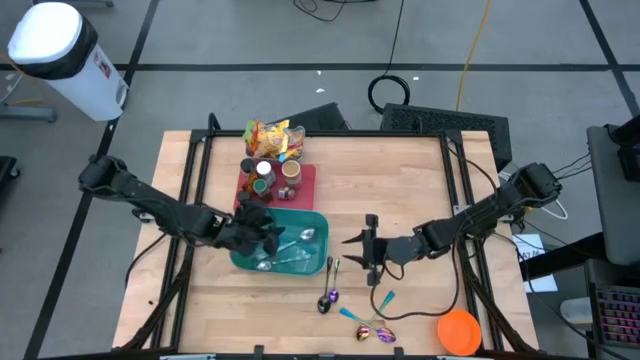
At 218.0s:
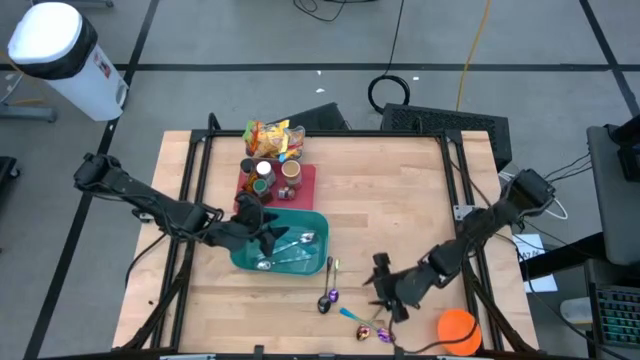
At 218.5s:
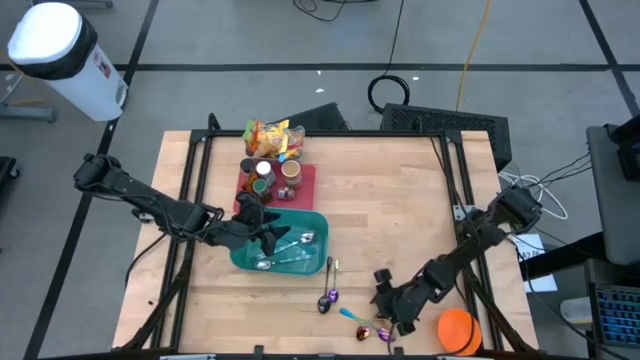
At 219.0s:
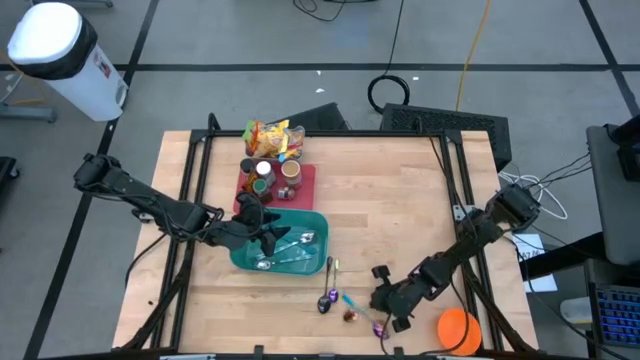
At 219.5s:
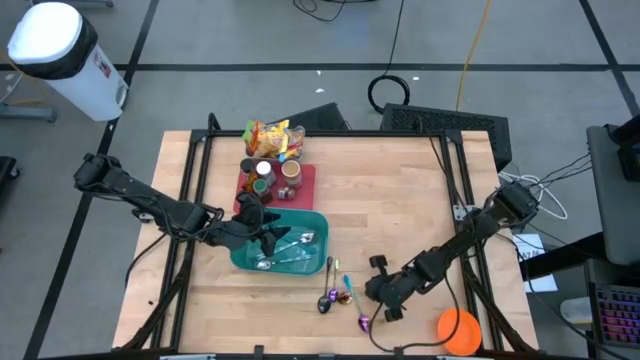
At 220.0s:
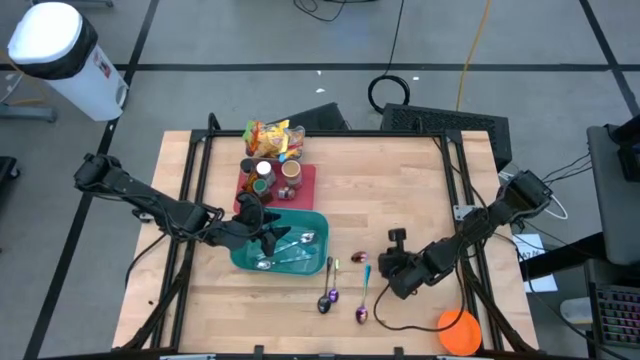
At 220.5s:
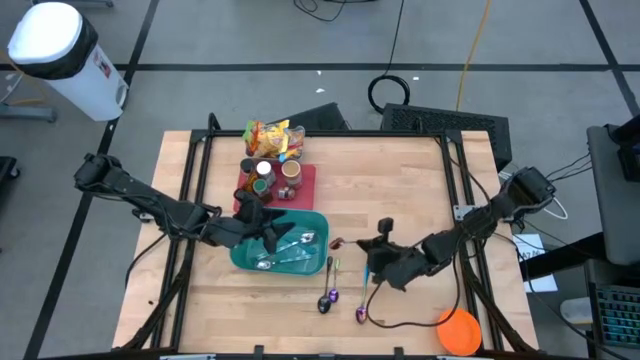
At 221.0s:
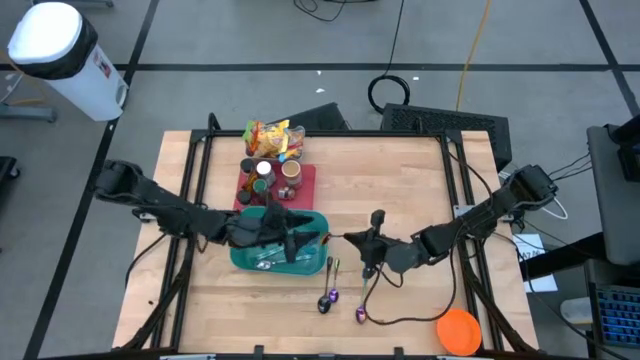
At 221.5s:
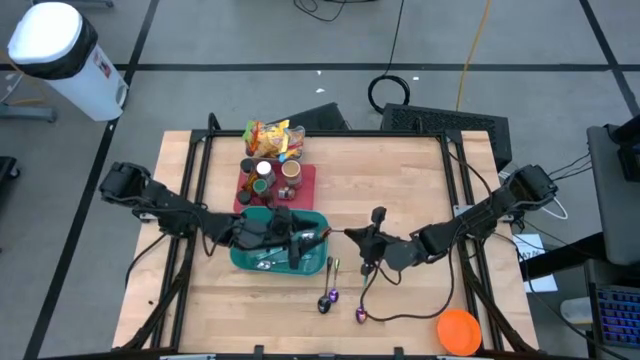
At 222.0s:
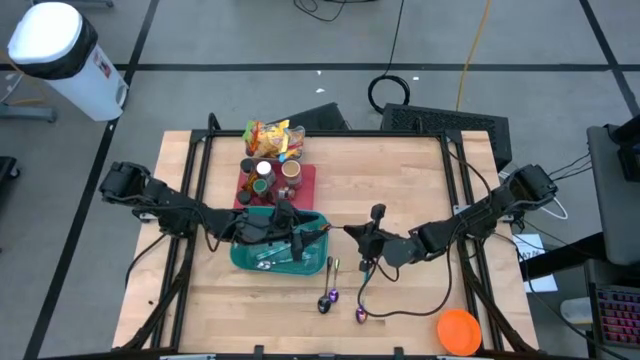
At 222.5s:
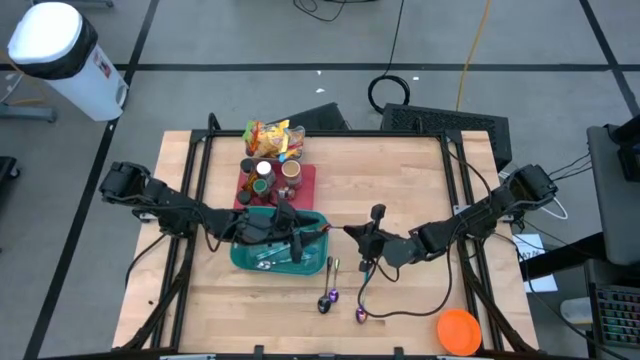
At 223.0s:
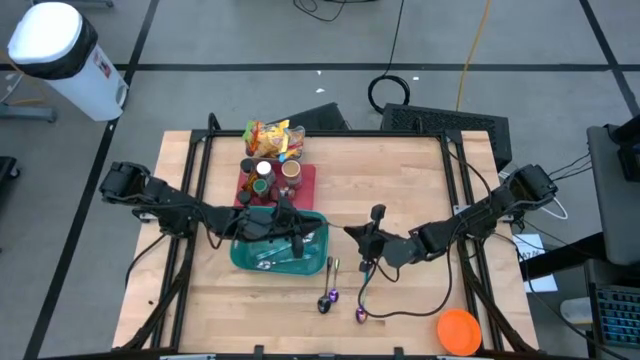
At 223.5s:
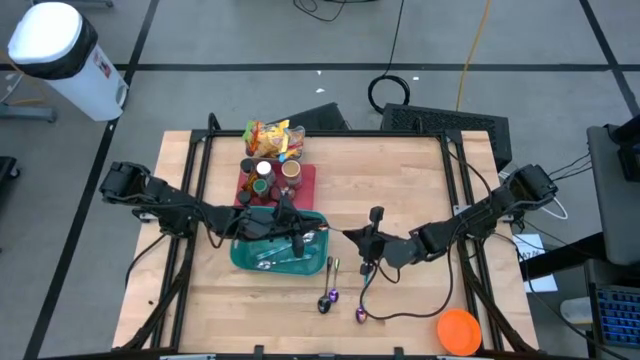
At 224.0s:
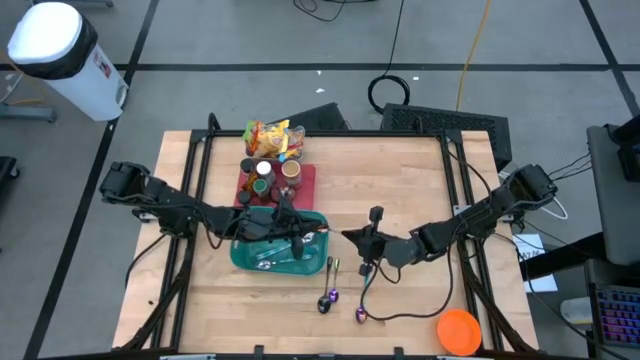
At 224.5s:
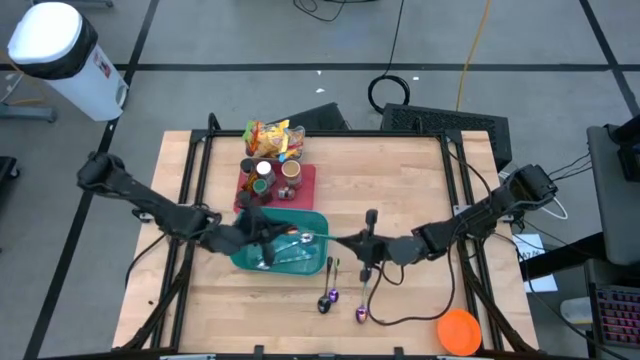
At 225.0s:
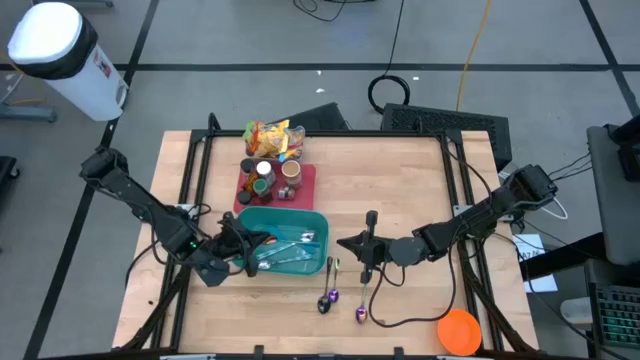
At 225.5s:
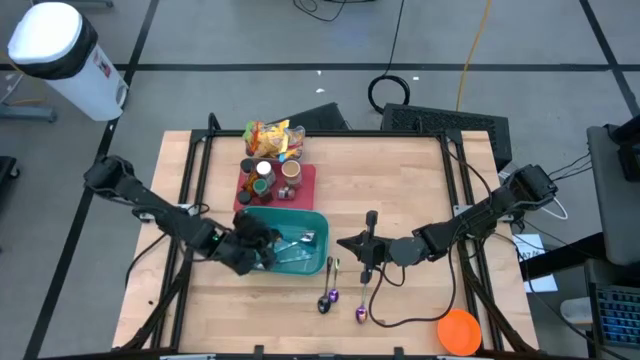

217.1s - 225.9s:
Task: Pick & Place Food Item
Put the right violet spoon into the blue bin

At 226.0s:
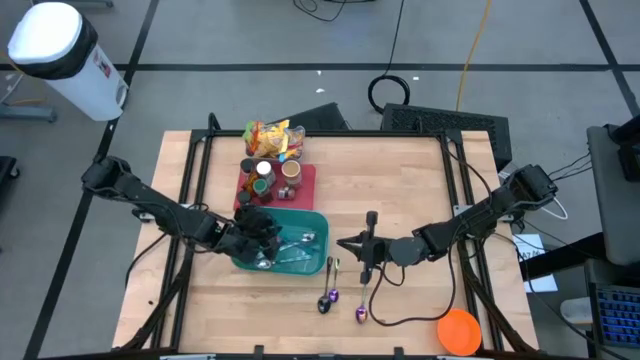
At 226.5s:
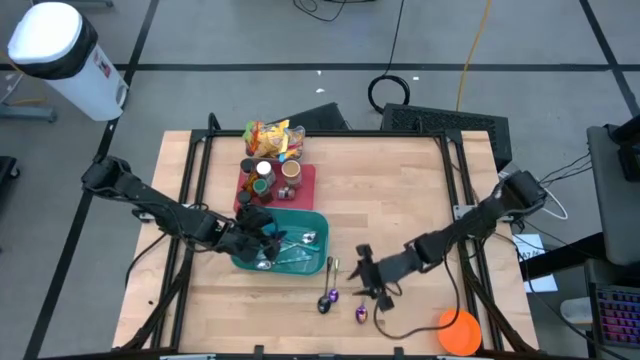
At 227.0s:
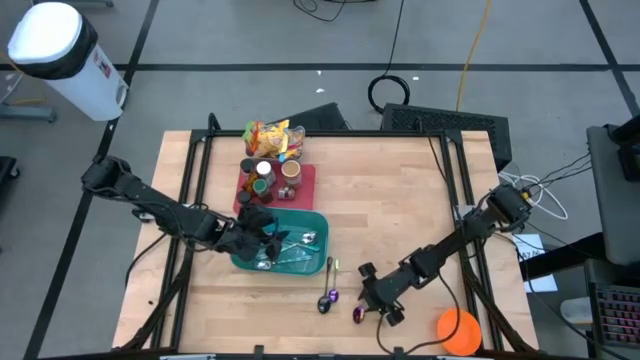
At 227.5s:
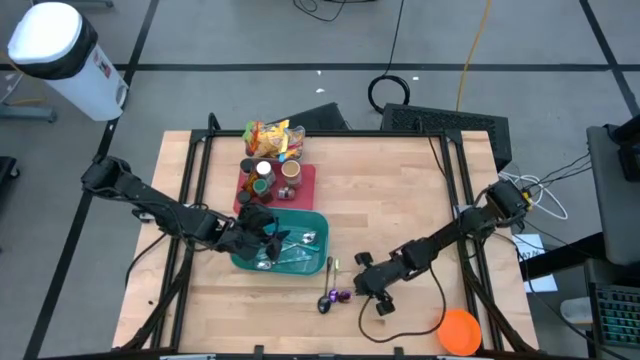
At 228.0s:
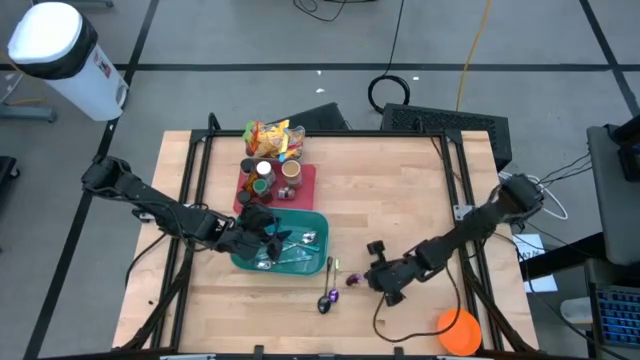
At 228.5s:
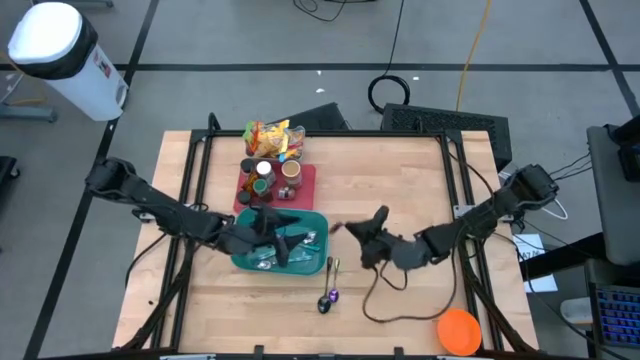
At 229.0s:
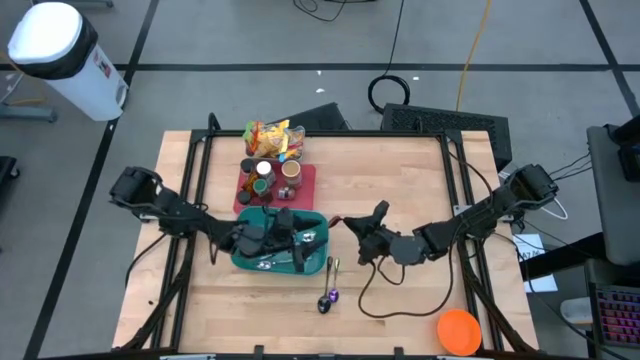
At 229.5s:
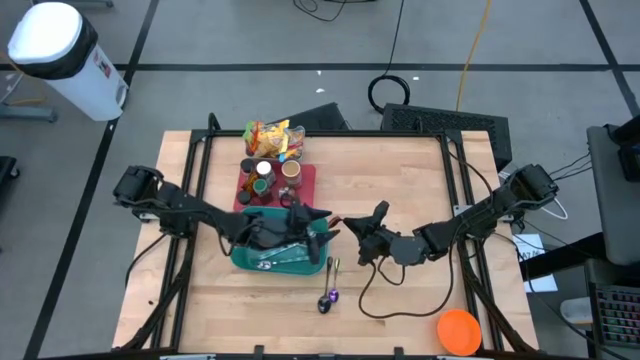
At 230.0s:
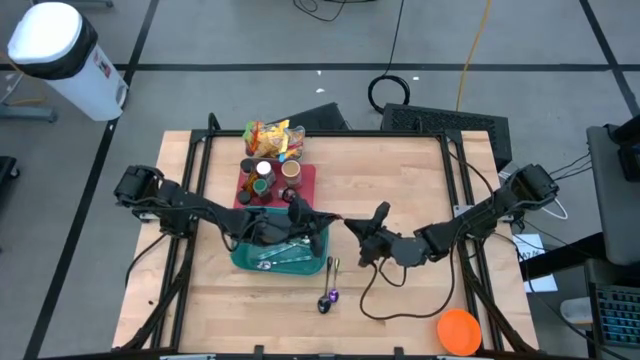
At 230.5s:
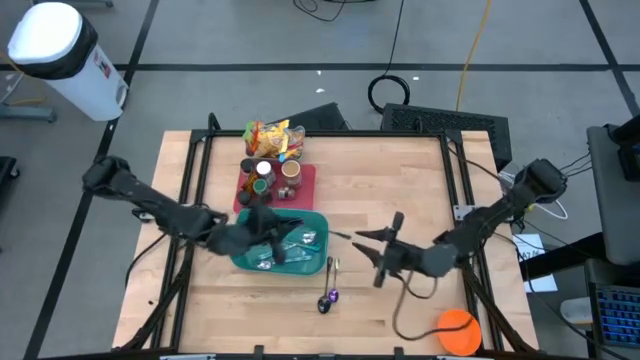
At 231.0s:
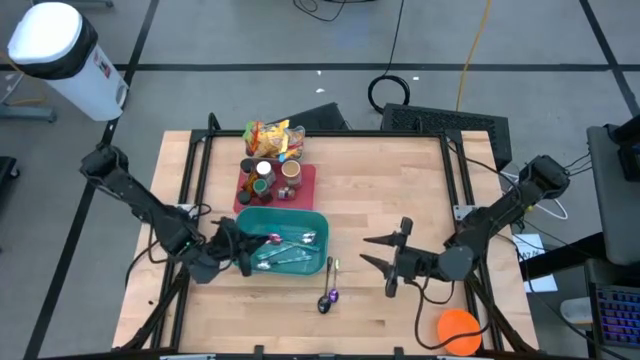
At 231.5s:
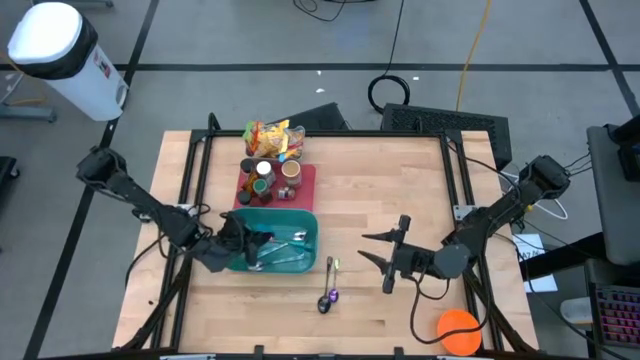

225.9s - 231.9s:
Put the right violet spoon into the blue bin

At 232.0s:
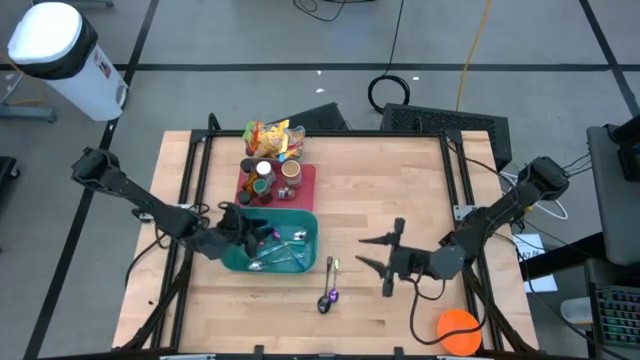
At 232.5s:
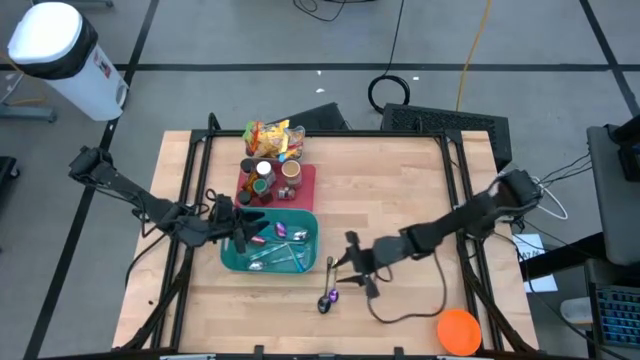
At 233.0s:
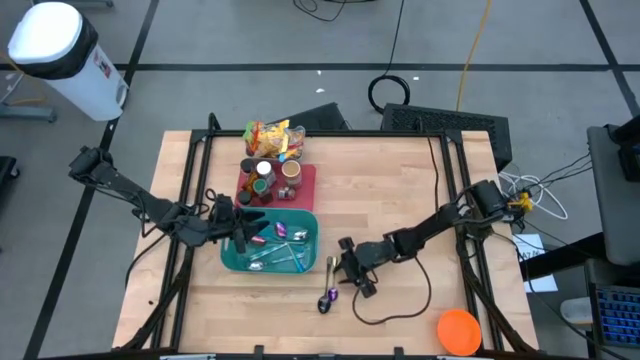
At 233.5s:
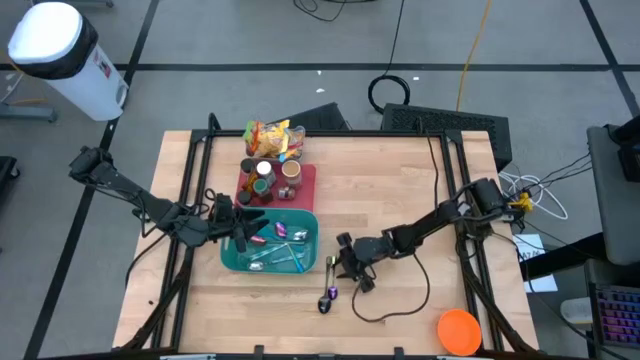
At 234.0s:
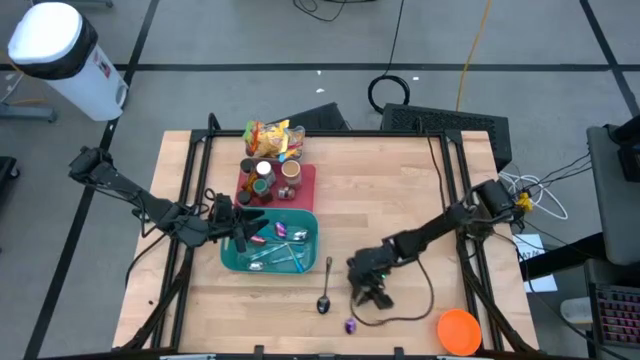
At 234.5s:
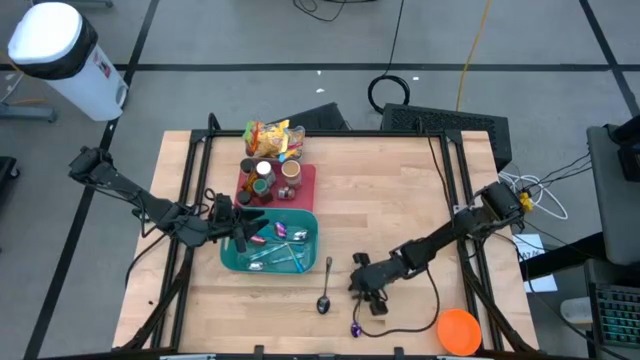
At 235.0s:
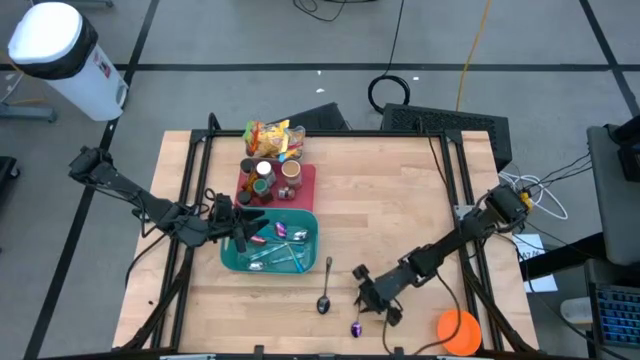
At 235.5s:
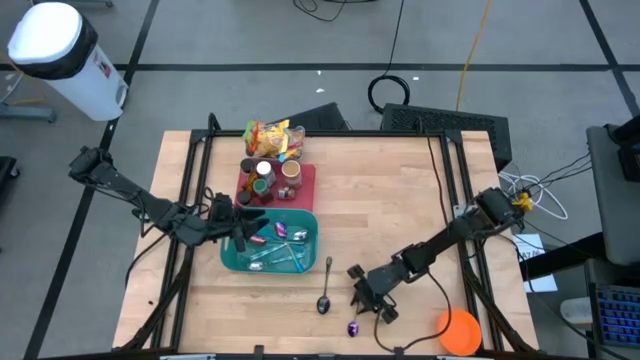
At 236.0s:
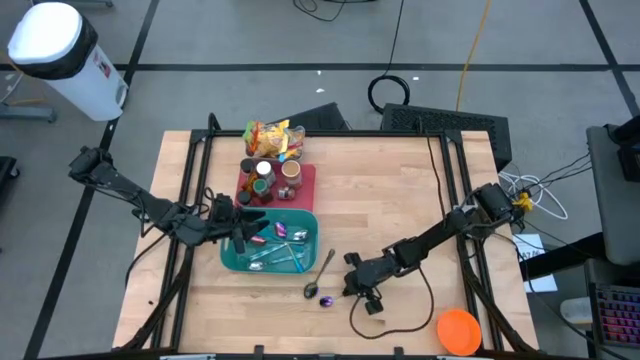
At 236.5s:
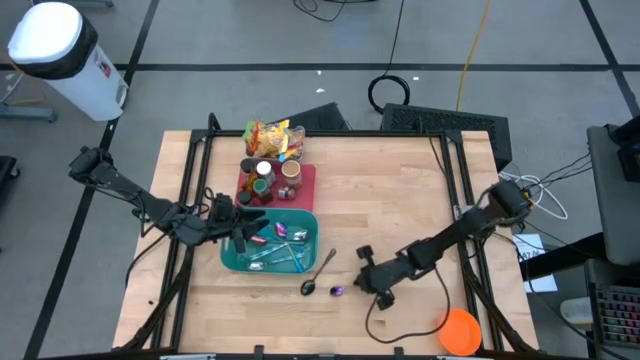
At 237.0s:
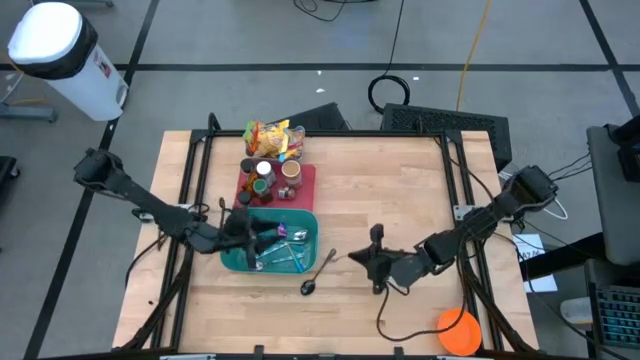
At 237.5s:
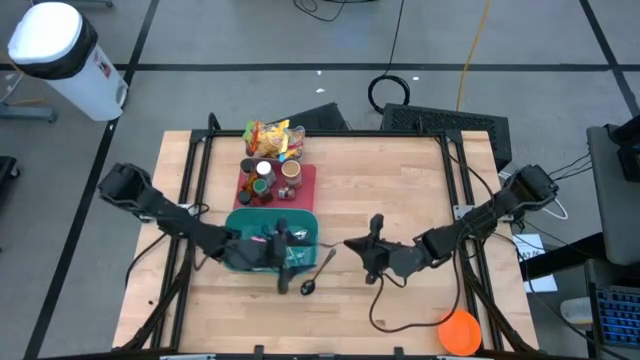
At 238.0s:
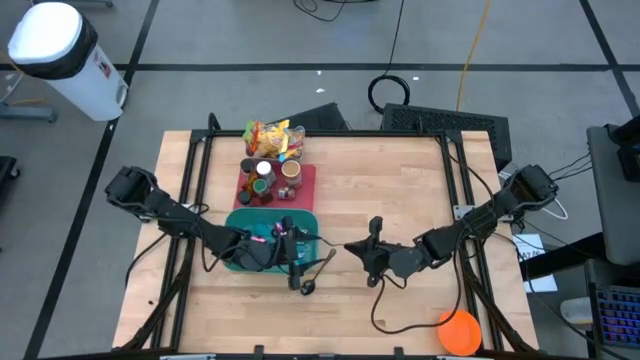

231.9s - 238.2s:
Put the violet spoon into the blue bin

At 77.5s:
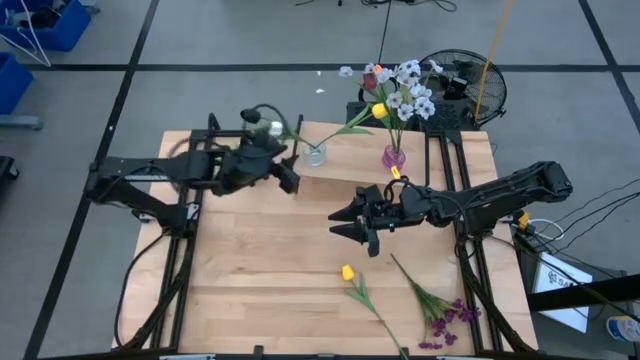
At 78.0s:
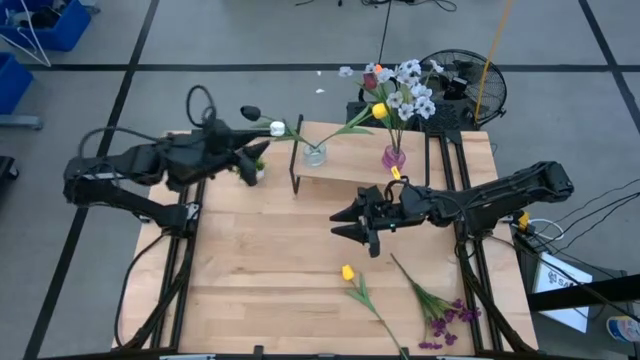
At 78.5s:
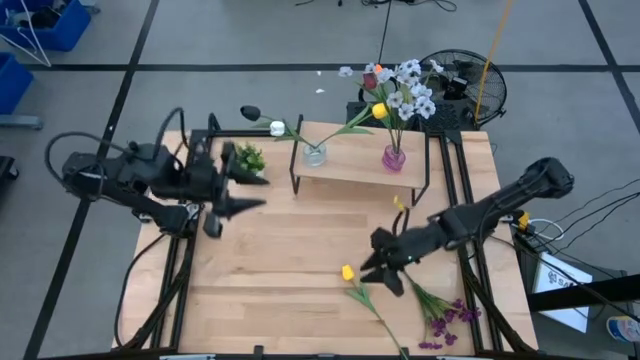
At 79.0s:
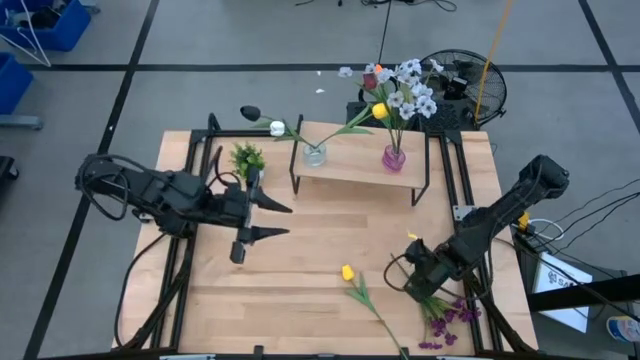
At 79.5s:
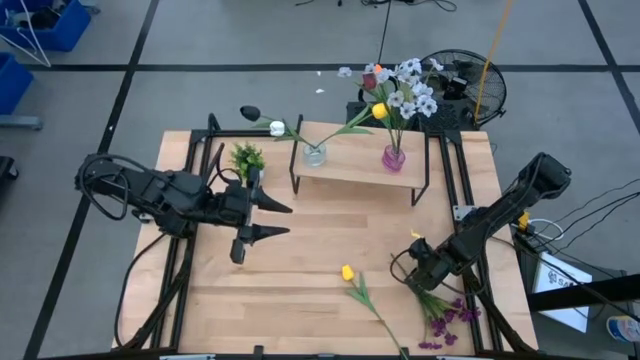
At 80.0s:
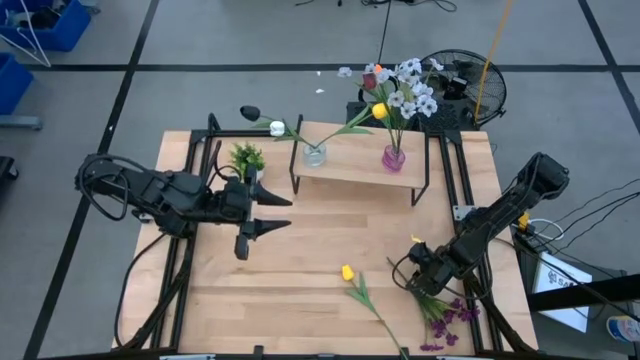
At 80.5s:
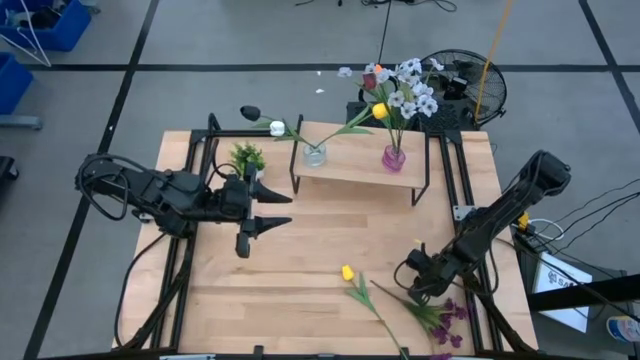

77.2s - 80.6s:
Task: Pick and place flowers into a vace then onto a shelf
Put the purple flowers into the transparent vase
